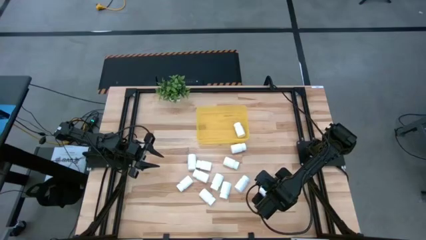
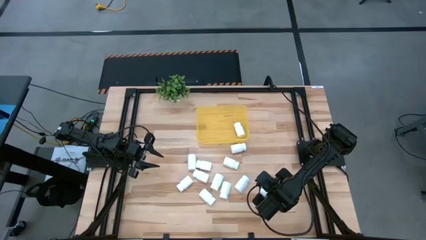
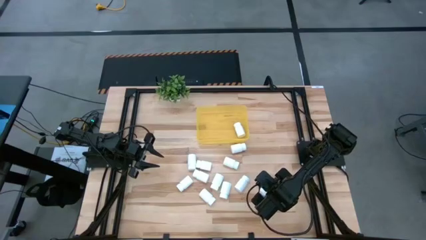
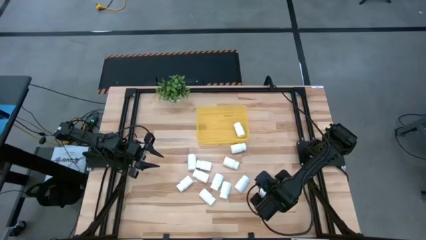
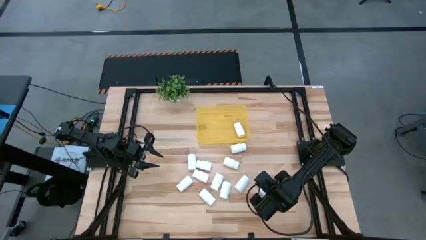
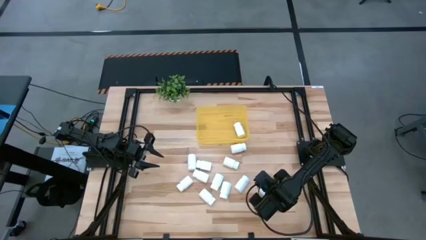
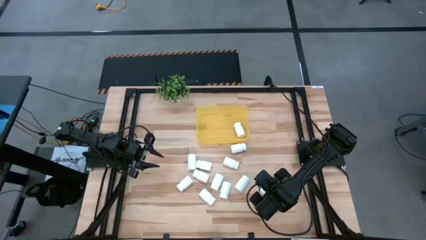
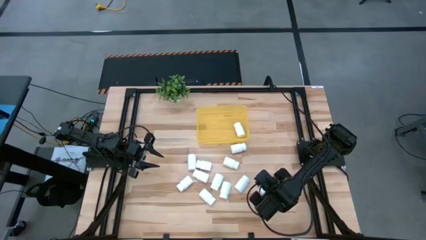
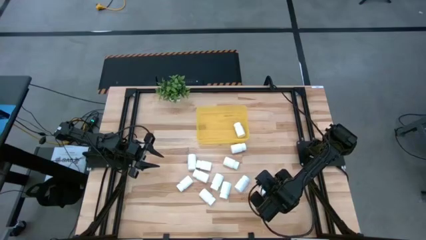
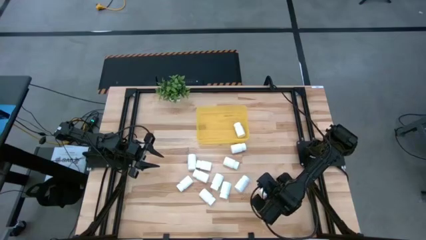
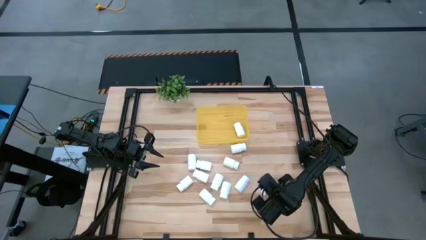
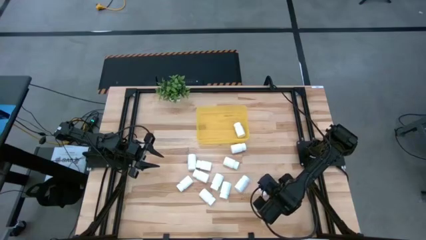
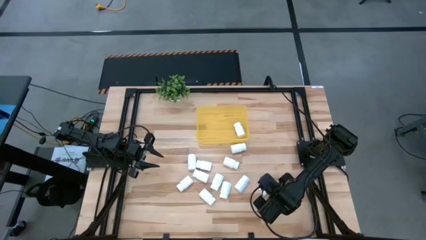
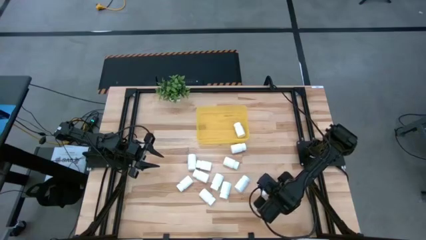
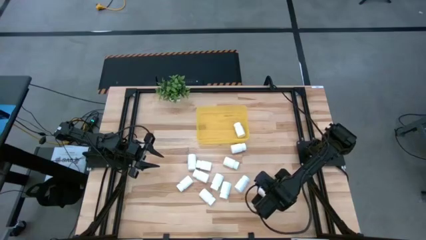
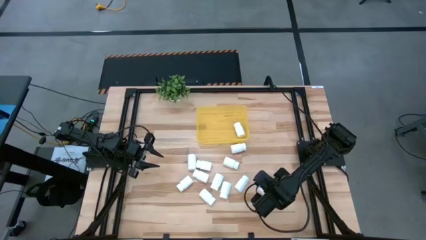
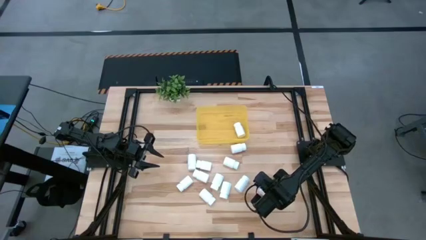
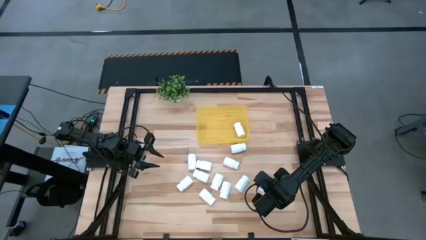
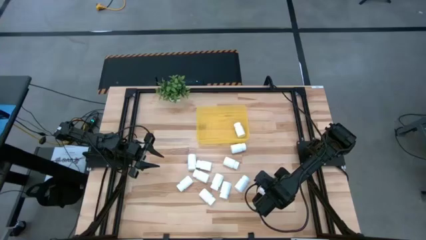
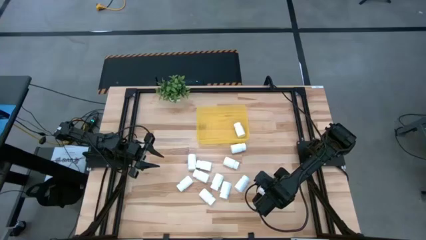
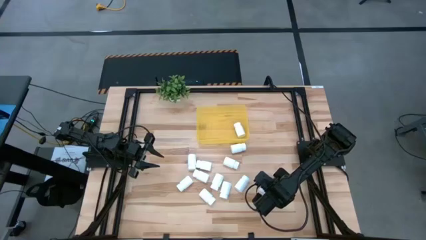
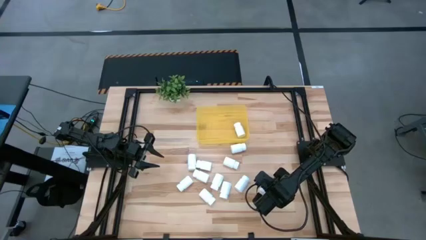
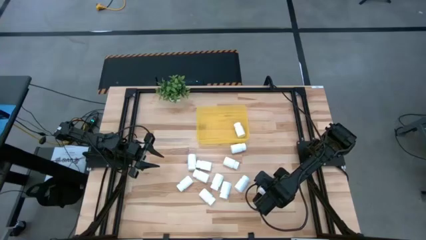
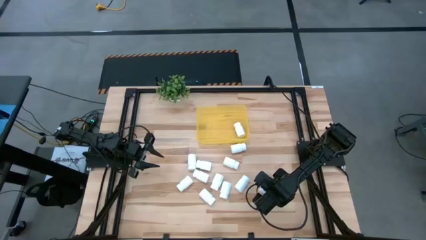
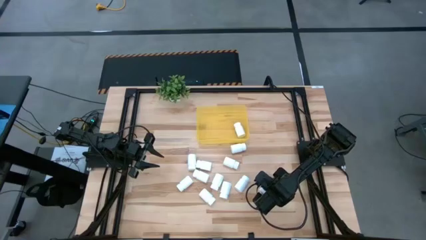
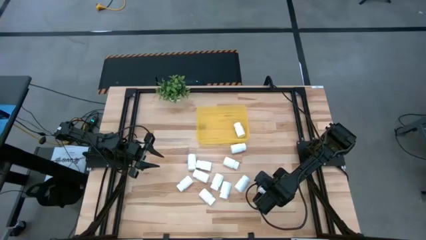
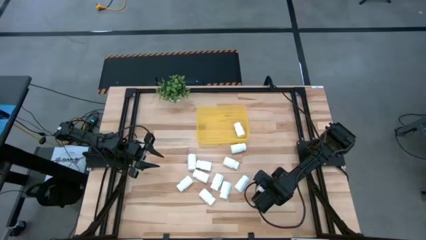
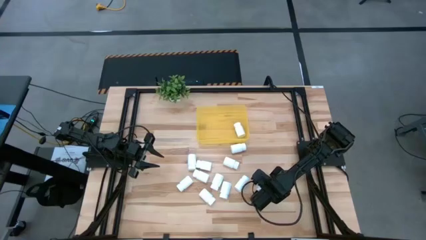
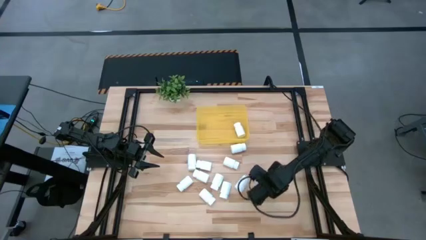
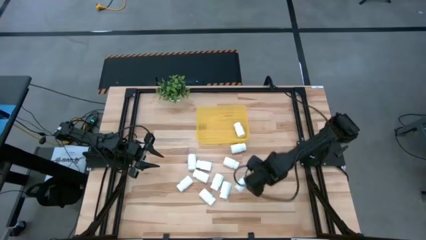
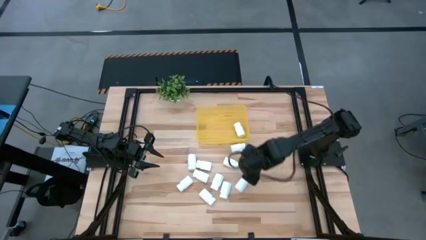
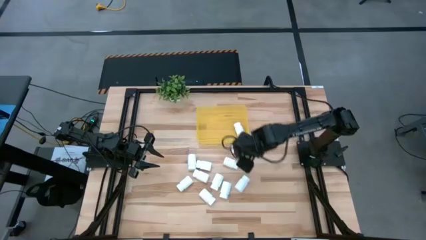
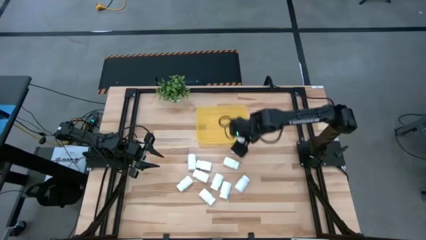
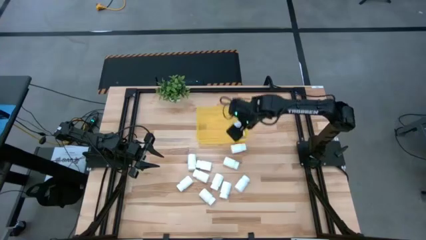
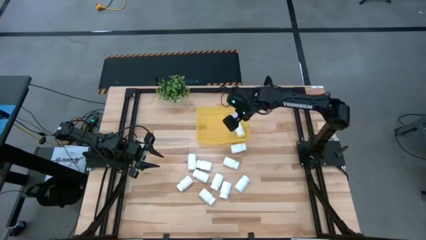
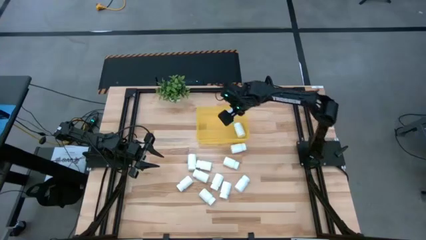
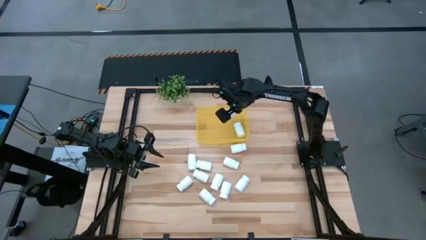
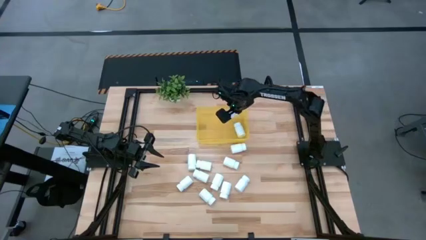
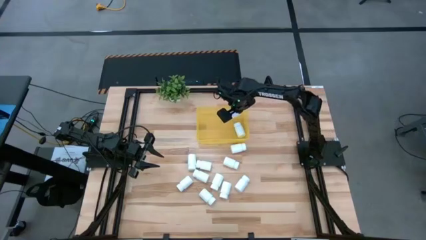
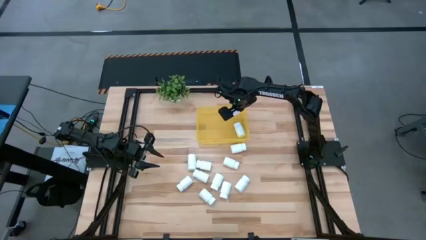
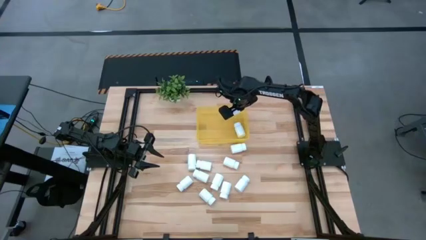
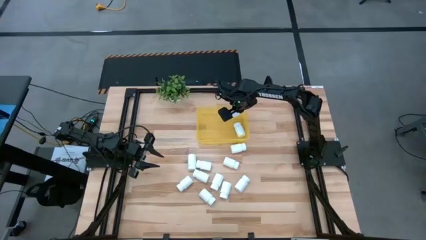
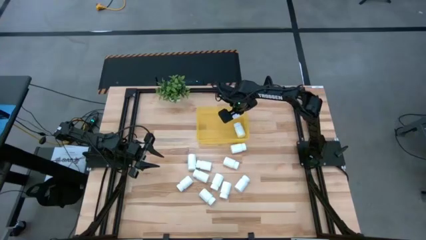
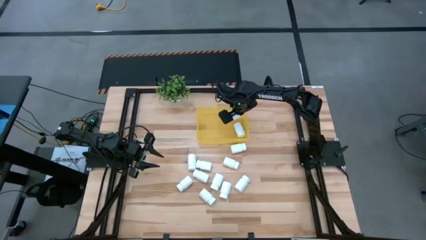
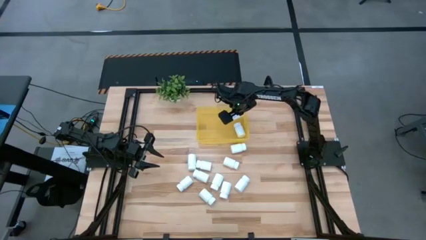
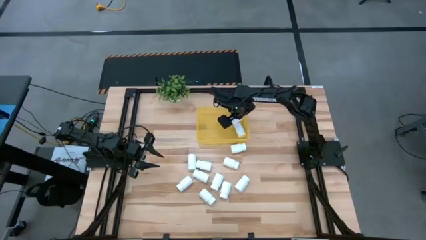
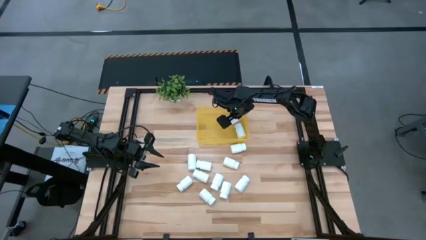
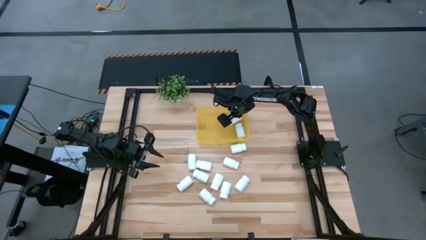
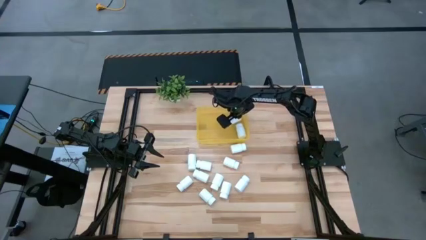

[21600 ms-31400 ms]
Task: Pick and place pill bottles into a basket
Put the white pill bottle into the yellow bin

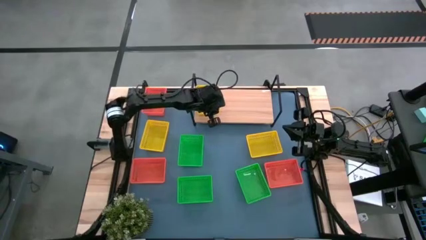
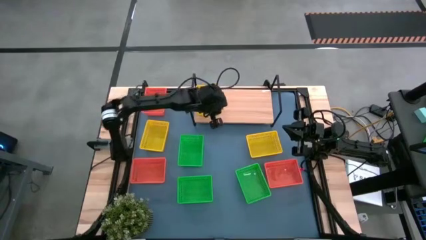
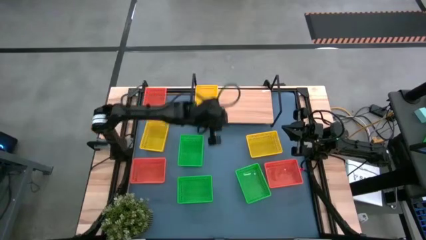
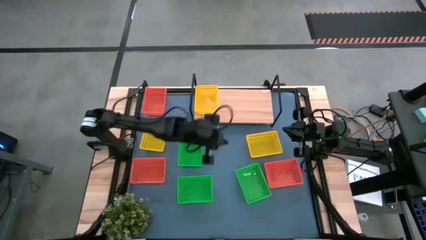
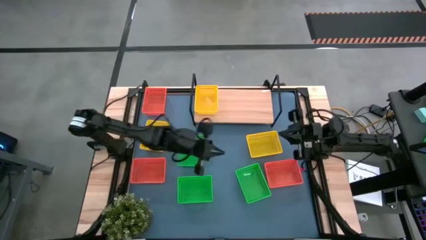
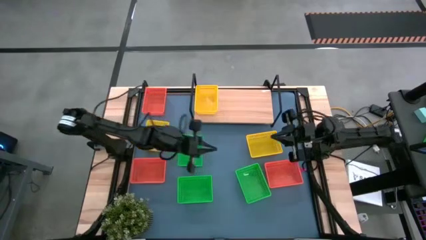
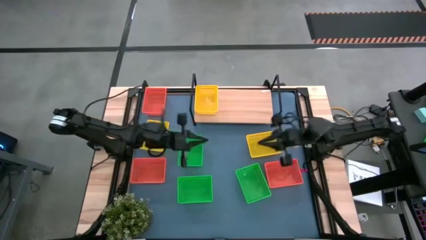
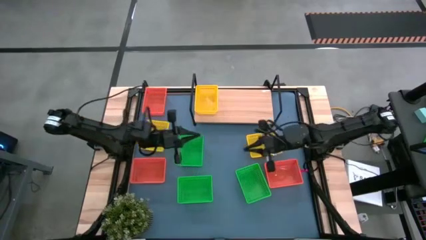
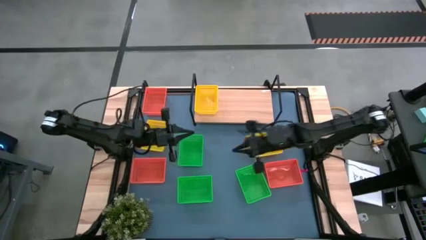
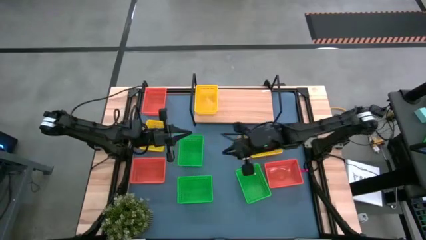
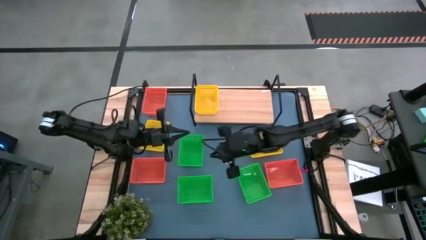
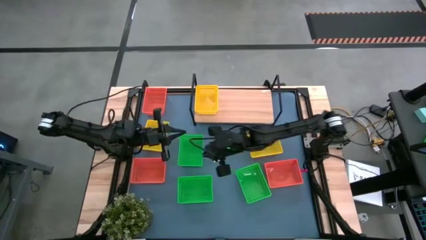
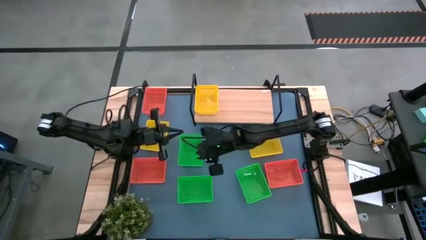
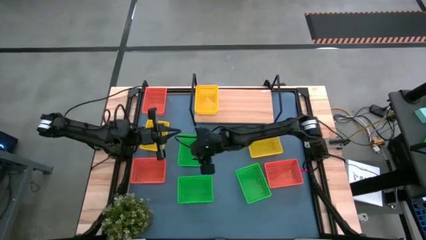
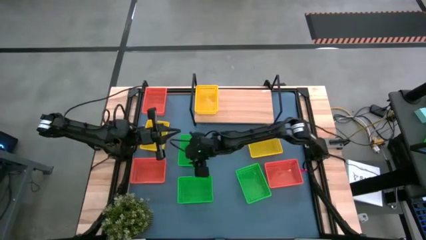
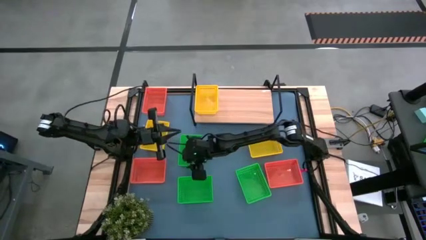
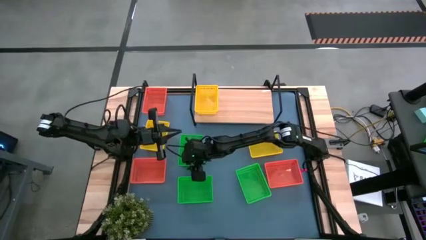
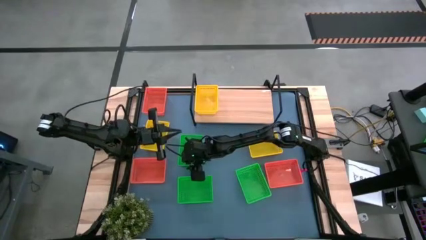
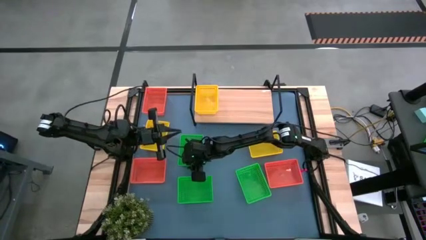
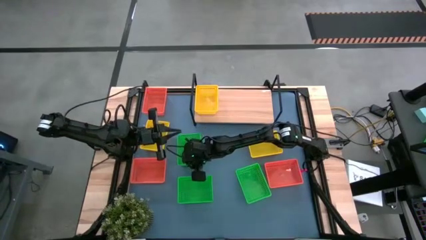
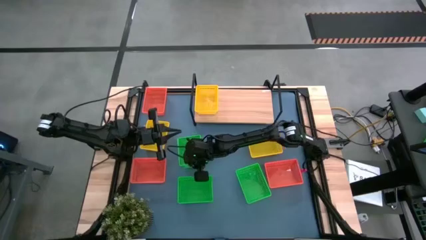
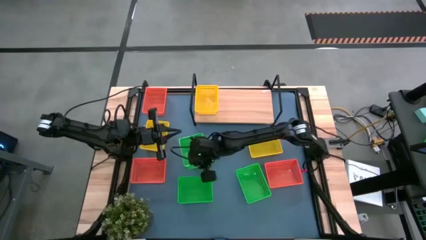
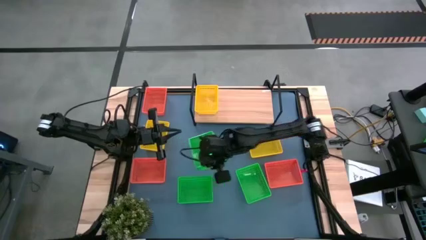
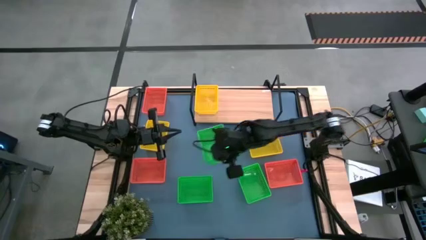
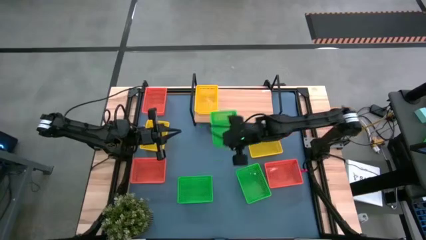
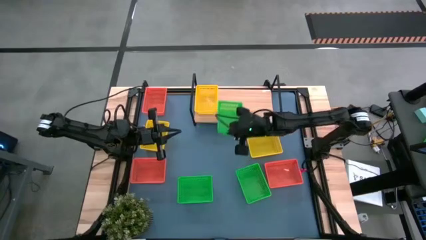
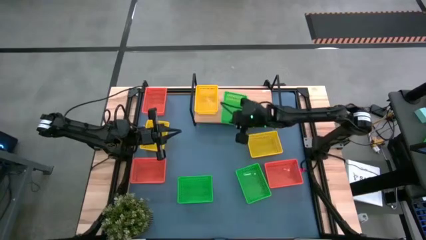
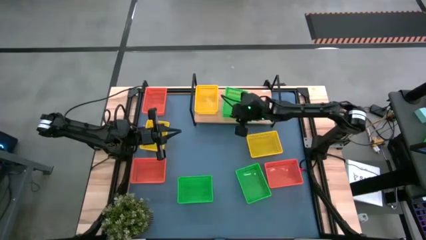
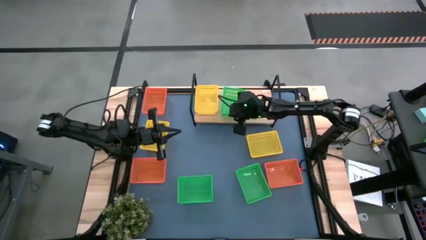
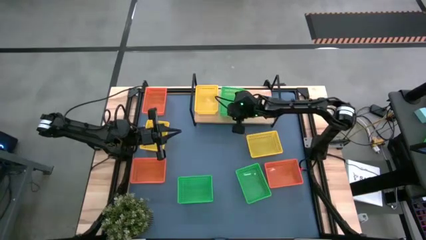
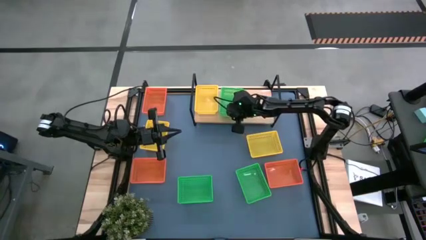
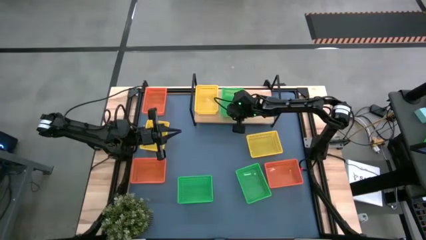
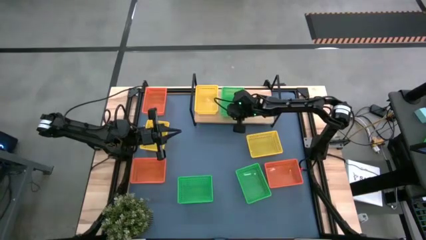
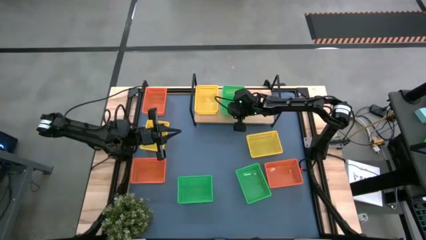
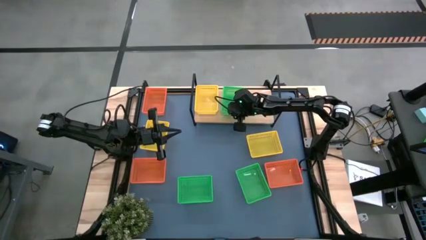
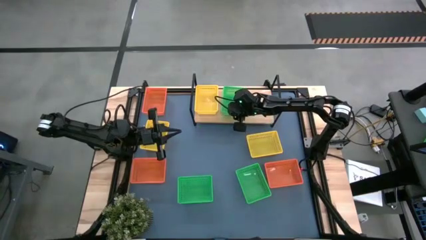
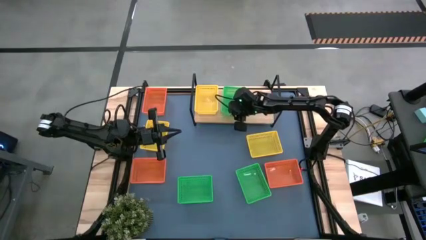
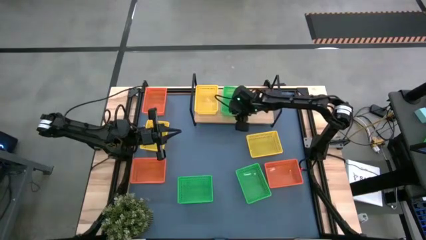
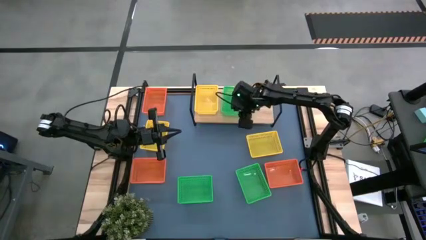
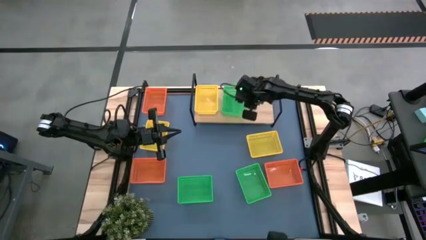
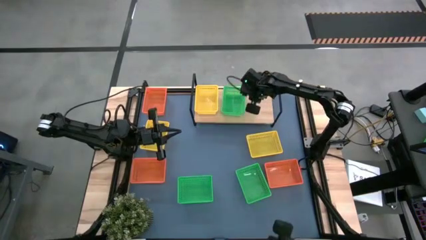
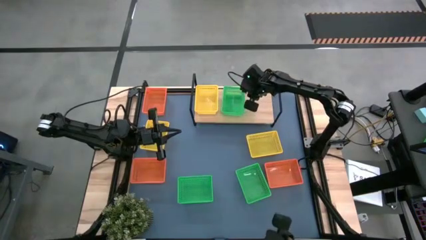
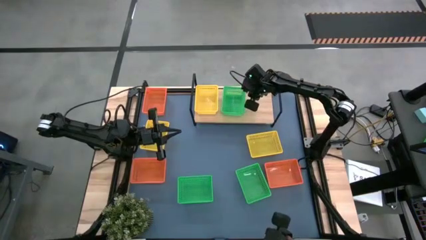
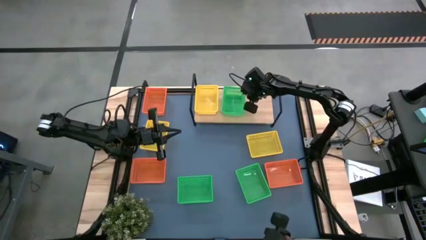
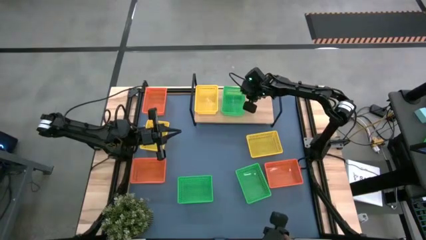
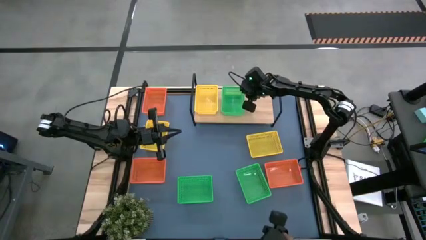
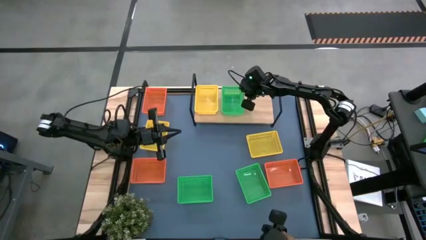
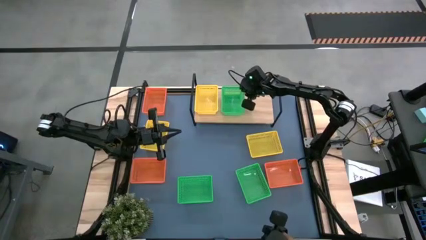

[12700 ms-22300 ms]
Task: Stack baskets on shelf by color
Put the top green bin on the shelf
